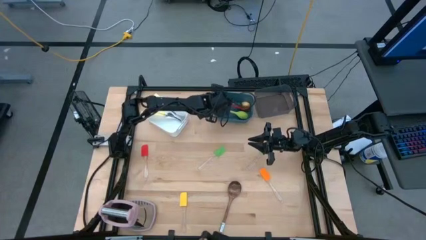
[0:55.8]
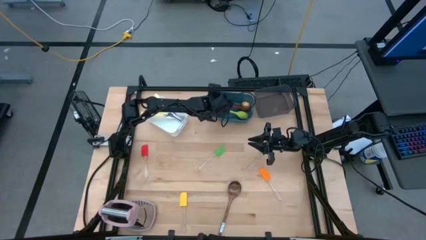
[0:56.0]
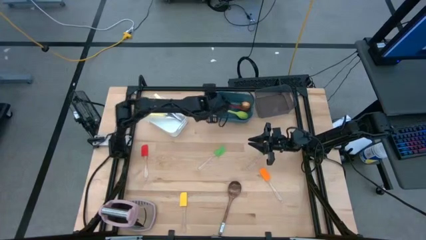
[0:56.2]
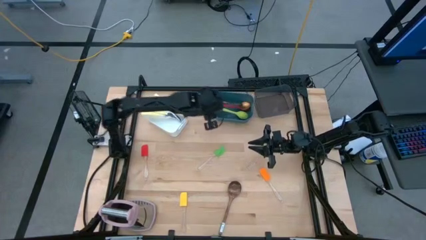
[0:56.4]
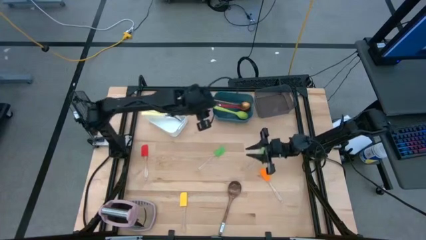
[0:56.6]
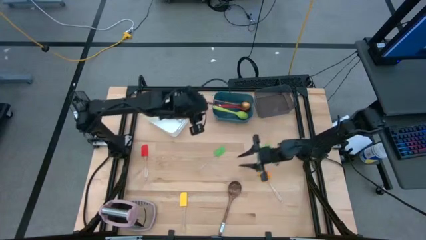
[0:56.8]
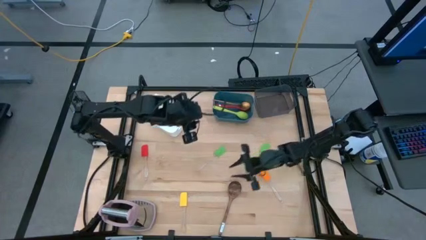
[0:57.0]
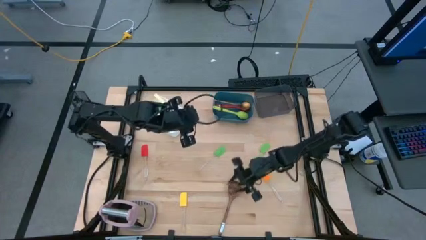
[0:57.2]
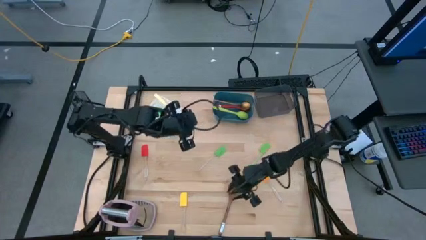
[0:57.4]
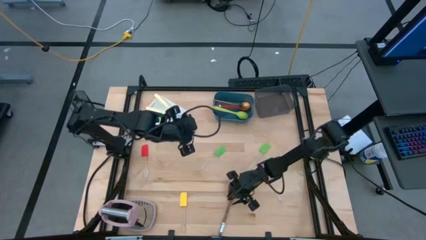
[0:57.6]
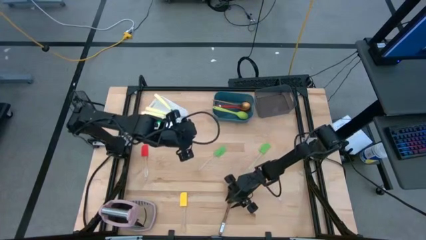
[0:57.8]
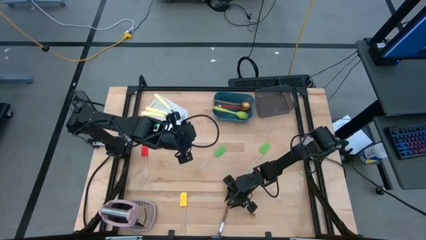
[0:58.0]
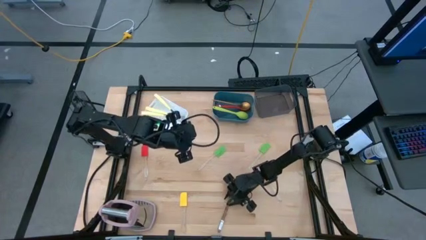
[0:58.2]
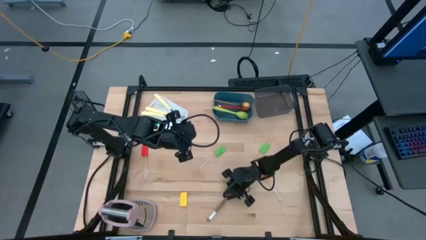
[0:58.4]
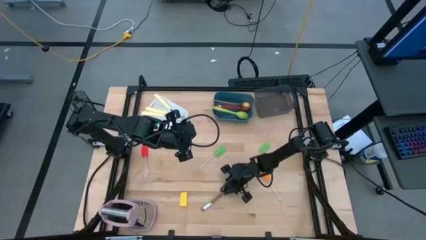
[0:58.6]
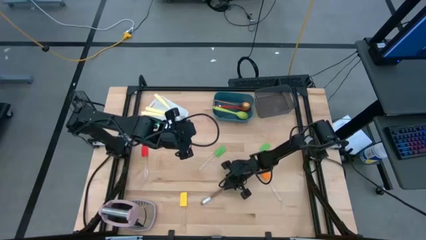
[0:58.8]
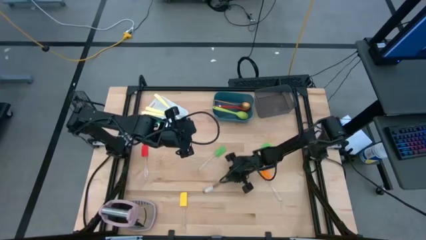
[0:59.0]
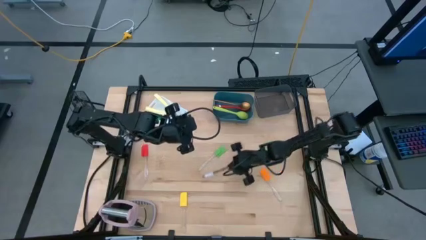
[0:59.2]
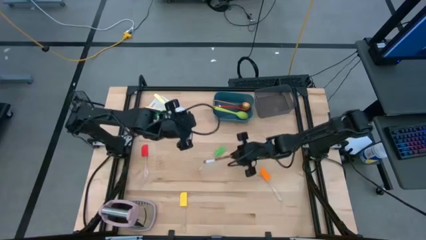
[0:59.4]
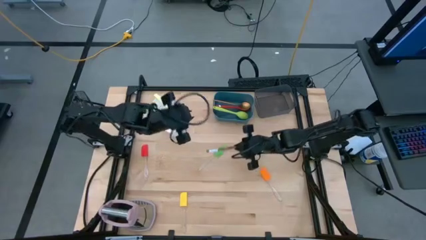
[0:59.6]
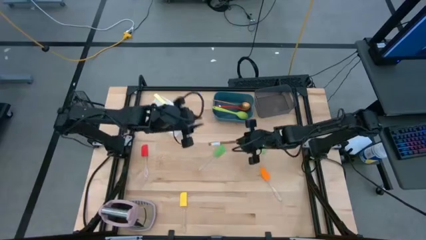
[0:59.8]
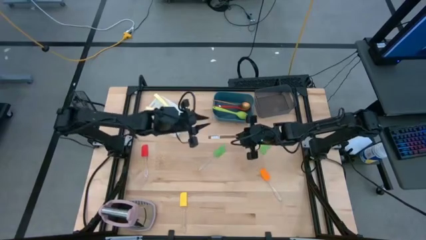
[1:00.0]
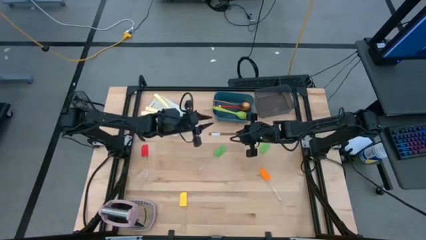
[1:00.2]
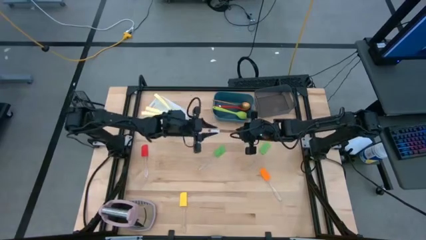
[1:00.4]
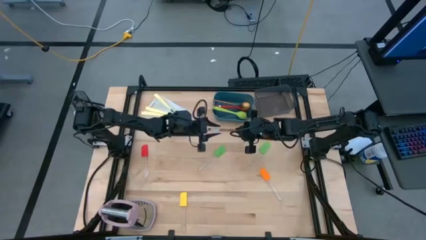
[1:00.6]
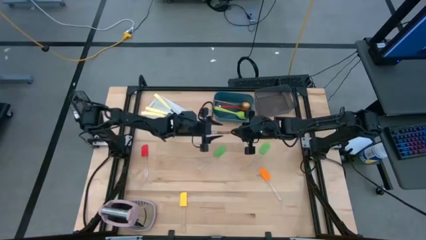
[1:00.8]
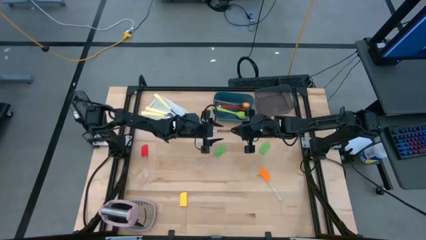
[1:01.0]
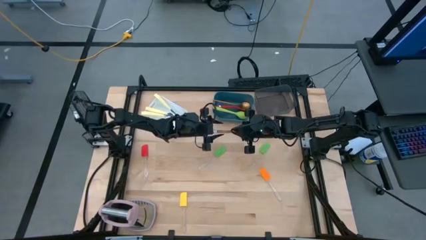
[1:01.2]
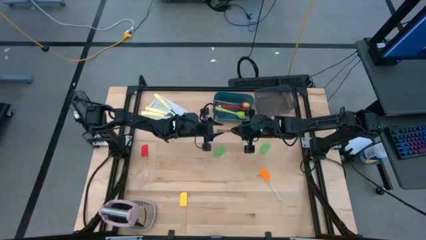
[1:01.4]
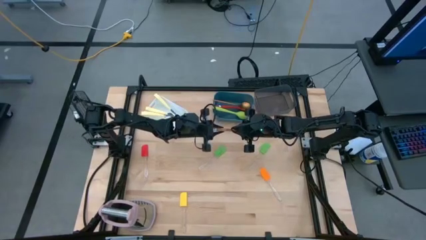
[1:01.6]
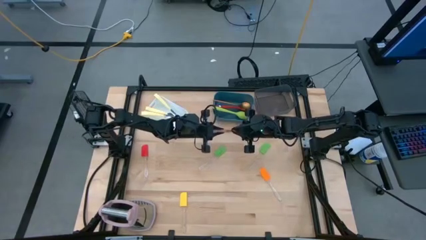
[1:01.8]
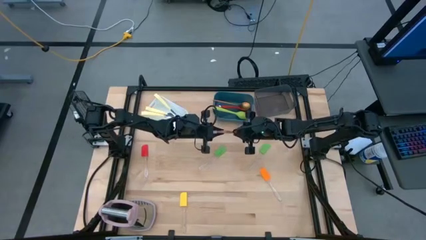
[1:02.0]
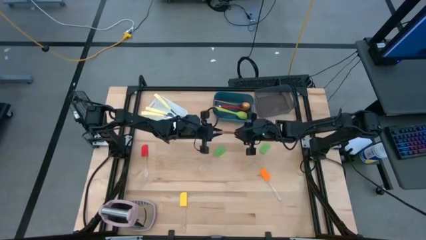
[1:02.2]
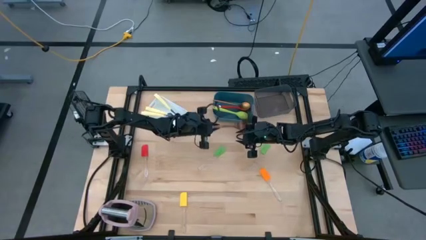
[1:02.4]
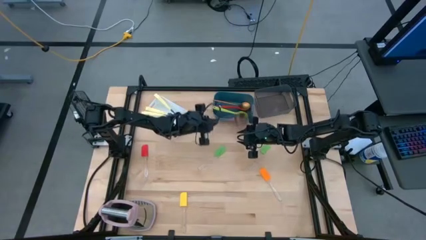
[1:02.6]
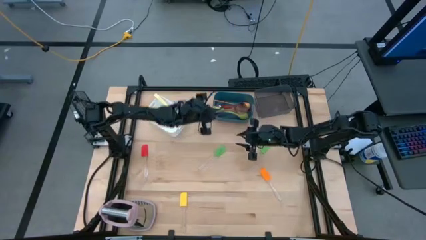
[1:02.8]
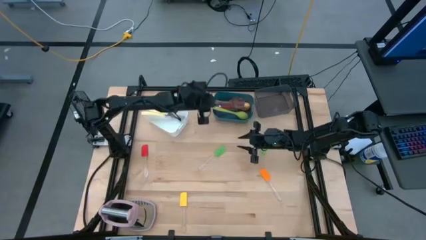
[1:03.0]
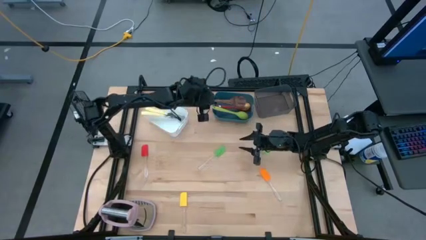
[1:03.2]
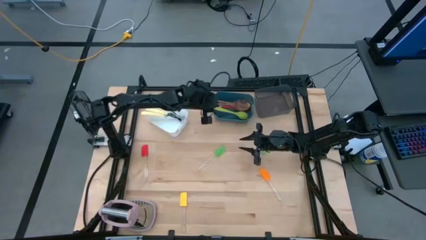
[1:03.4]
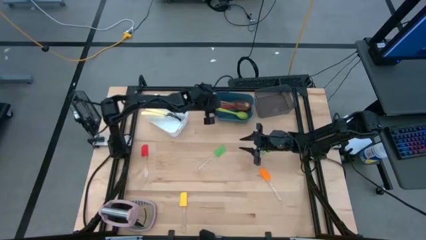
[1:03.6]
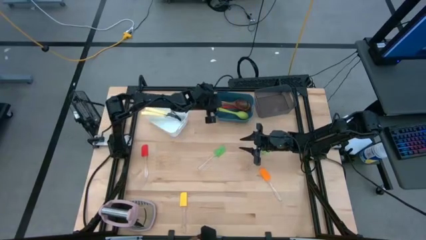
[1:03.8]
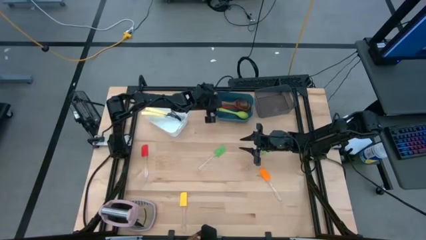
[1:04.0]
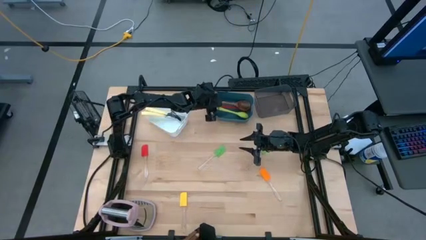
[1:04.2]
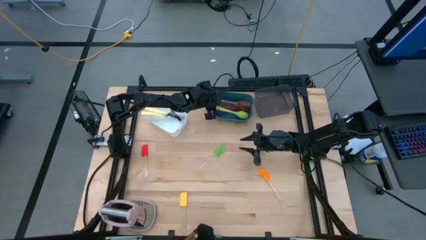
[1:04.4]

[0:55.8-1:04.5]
Task: Pick & Place Kitchen Items
Put the brown serving spoon into the blue bin

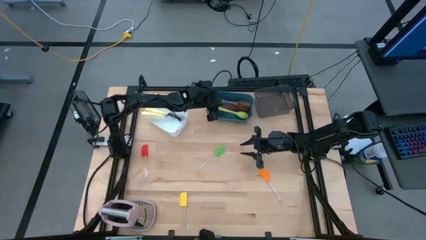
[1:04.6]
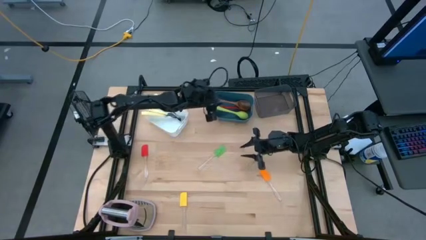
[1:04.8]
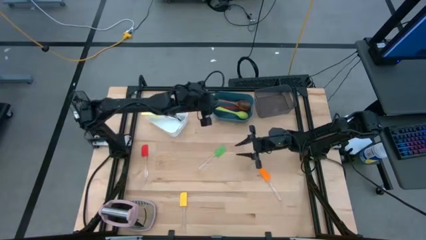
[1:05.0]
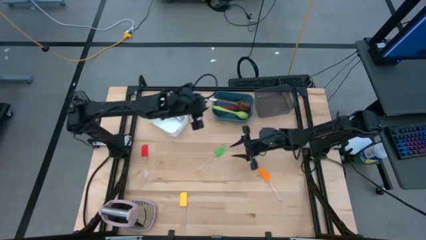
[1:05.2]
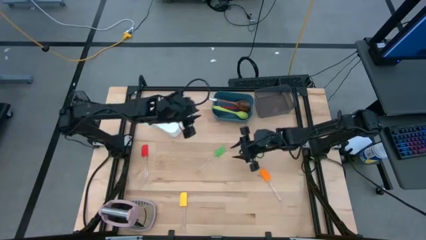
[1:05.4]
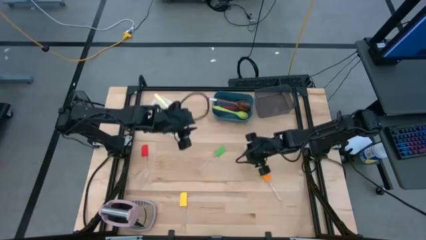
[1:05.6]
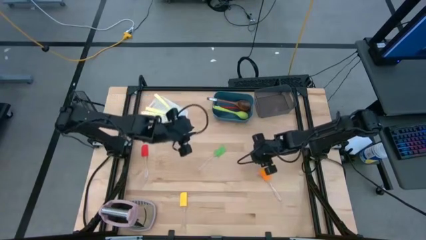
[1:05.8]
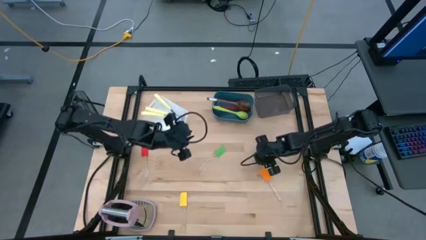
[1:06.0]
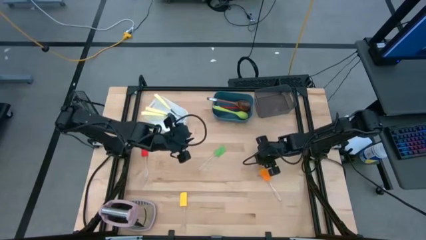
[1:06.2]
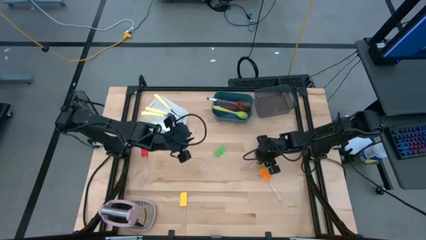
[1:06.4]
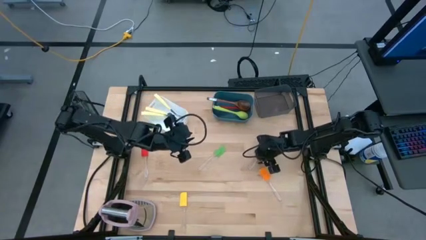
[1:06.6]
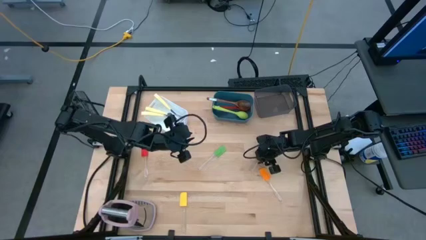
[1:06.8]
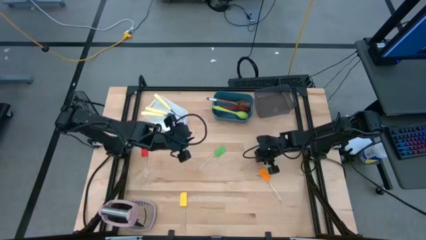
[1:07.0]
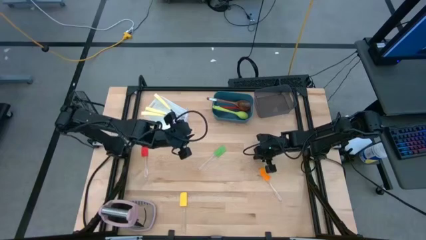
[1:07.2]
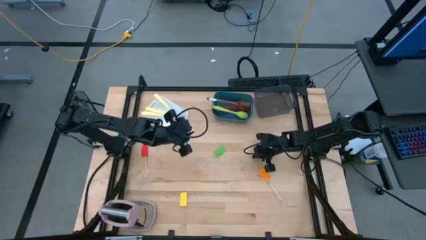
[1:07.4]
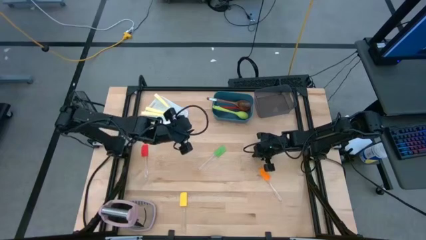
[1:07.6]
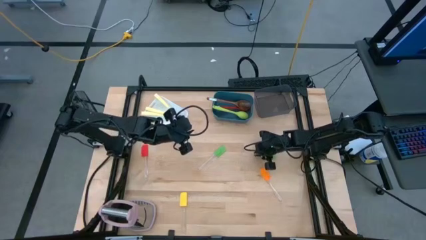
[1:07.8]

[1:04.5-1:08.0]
Put the right green spatula into the black bin

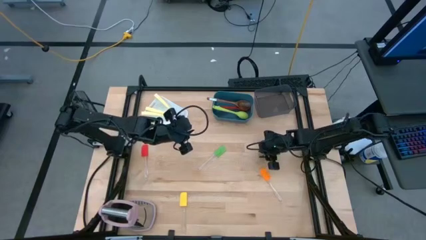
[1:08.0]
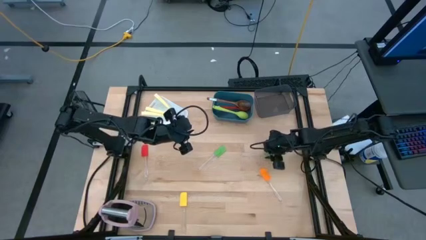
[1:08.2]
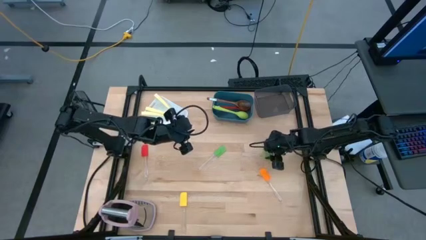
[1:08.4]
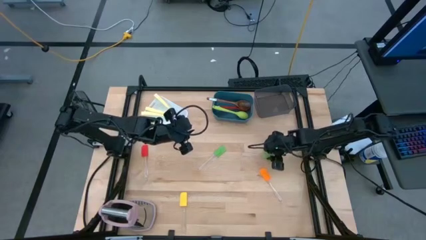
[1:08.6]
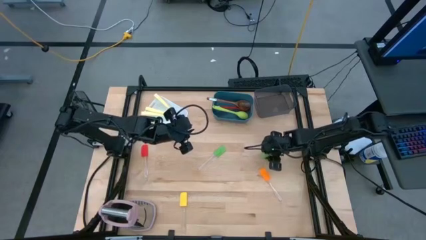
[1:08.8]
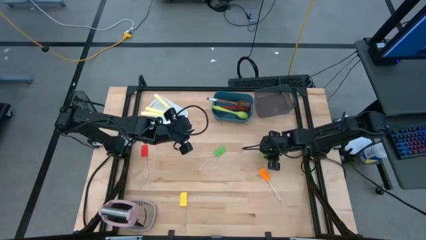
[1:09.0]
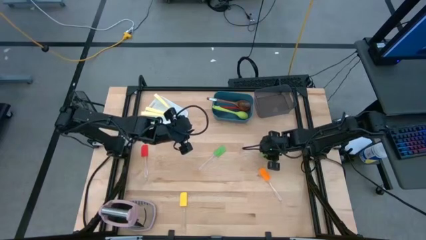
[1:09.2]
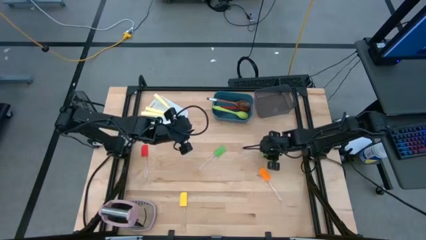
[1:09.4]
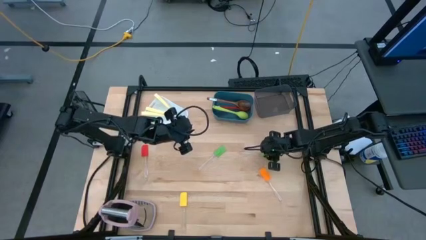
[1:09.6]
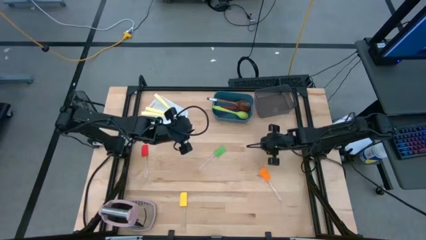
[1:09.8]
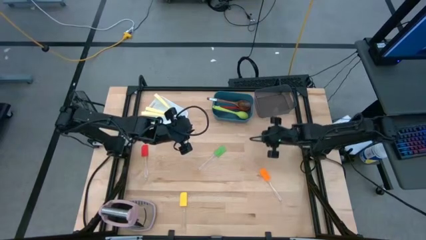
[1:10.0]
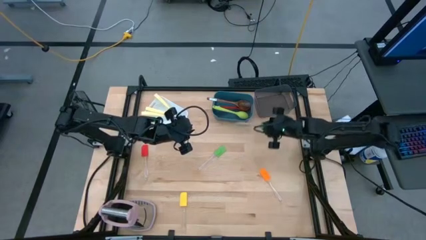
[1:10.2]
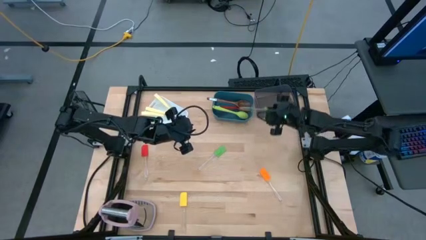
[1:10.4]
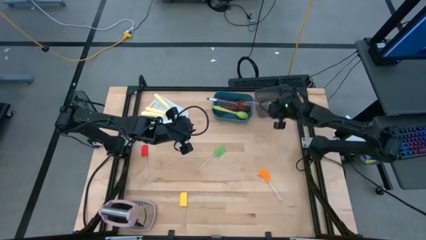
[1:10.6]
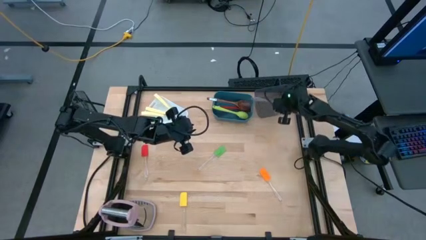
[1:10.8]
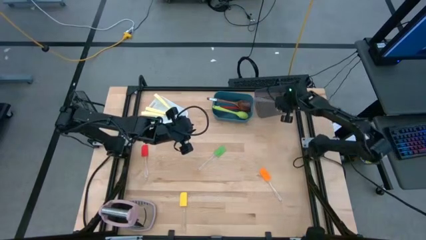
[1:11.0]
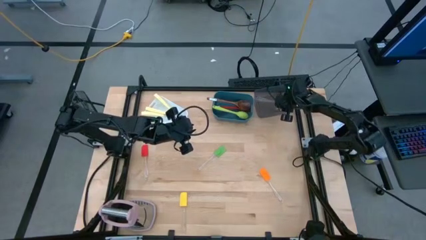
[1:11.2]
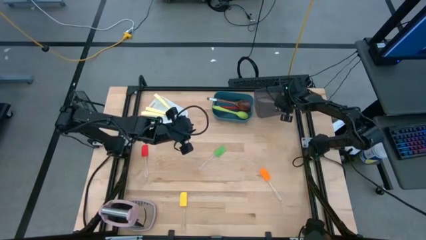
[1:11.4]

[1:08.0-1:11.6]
Put the right green spatula into the black bin
